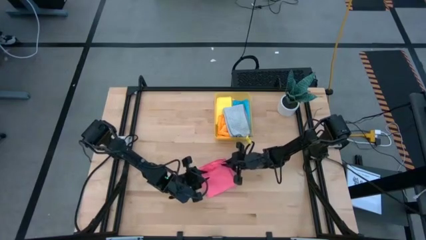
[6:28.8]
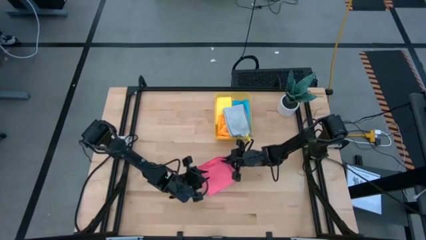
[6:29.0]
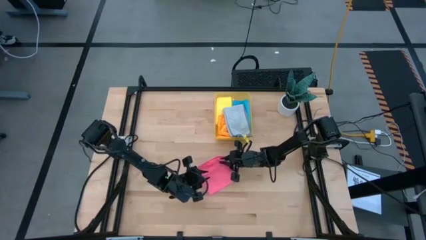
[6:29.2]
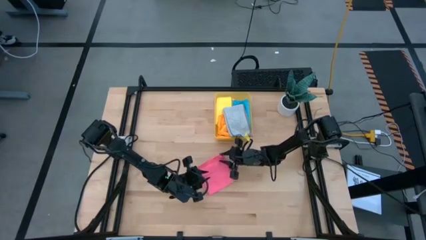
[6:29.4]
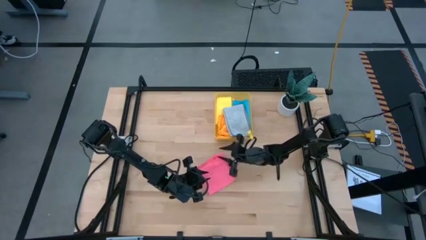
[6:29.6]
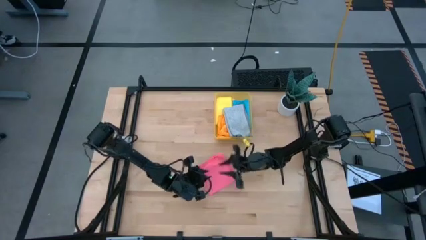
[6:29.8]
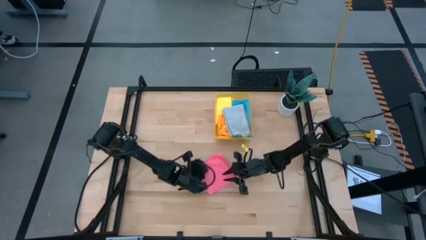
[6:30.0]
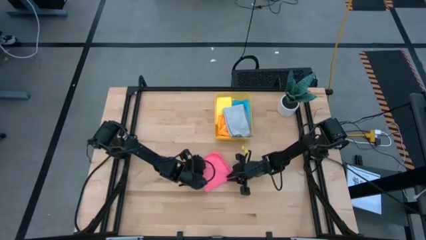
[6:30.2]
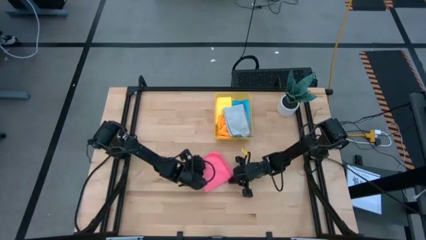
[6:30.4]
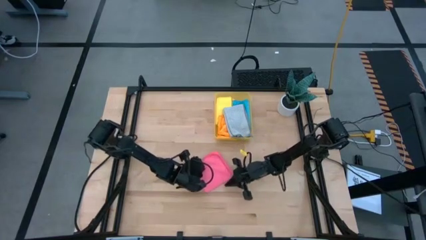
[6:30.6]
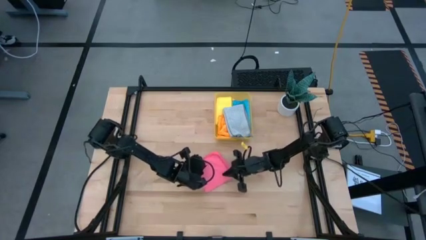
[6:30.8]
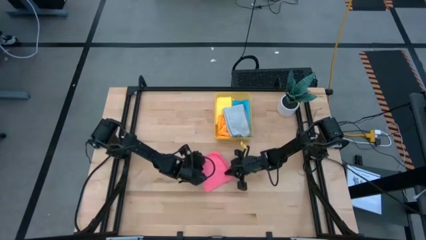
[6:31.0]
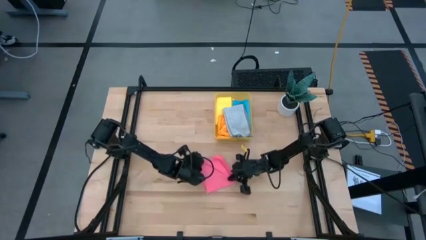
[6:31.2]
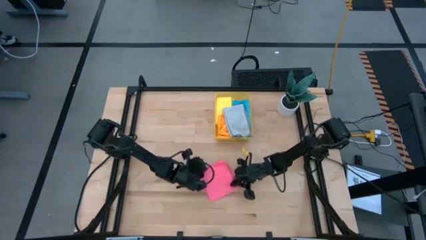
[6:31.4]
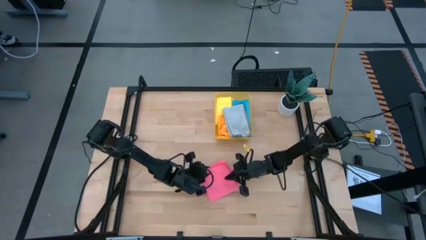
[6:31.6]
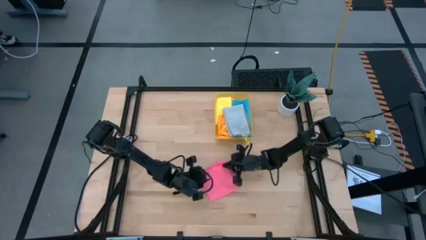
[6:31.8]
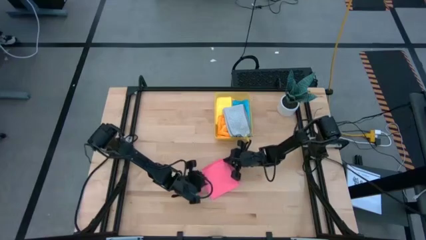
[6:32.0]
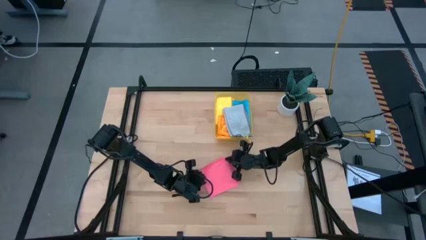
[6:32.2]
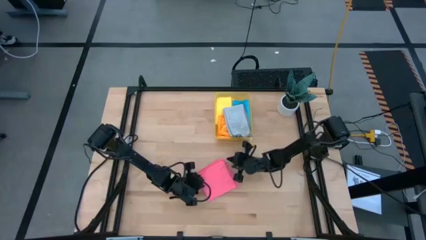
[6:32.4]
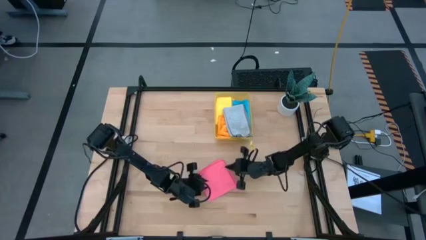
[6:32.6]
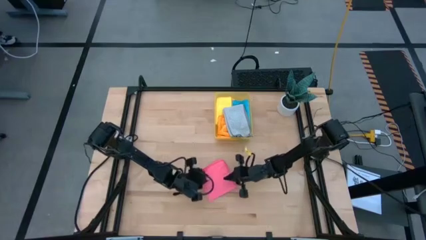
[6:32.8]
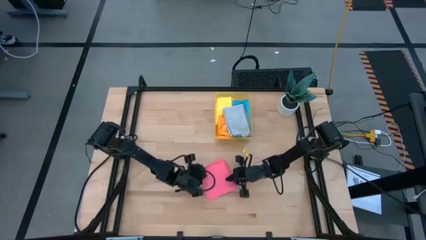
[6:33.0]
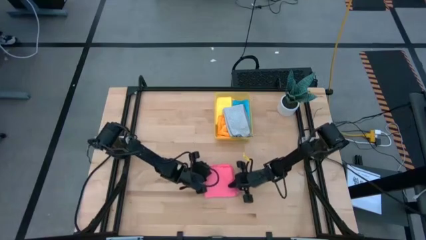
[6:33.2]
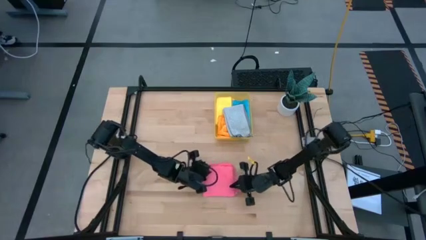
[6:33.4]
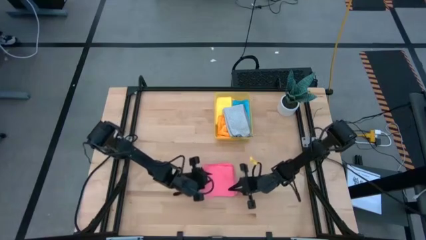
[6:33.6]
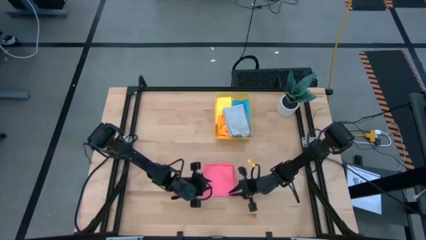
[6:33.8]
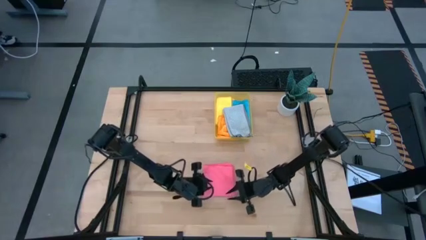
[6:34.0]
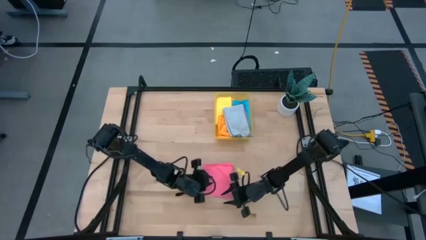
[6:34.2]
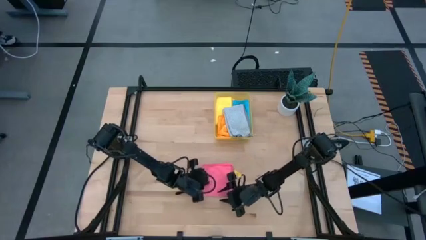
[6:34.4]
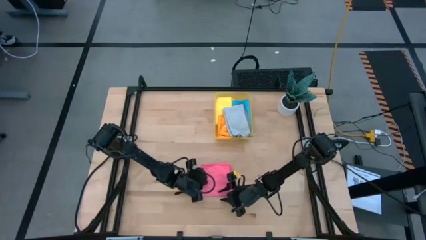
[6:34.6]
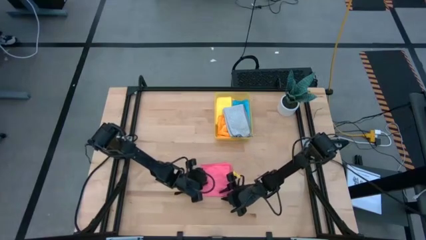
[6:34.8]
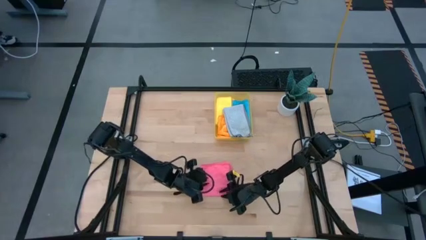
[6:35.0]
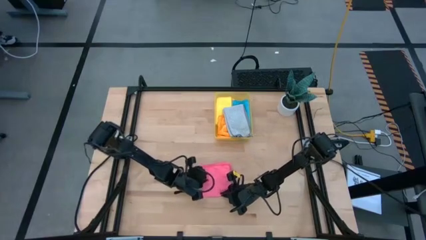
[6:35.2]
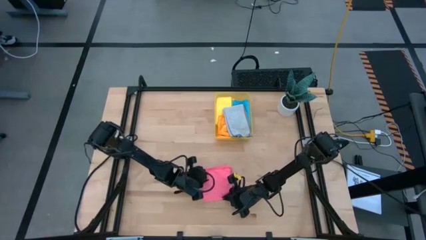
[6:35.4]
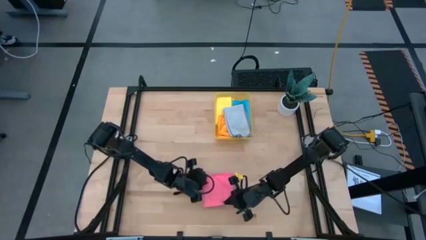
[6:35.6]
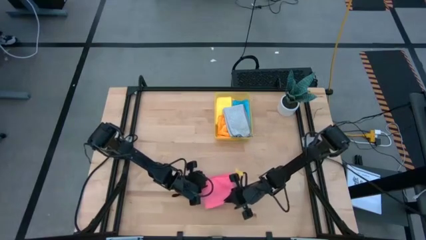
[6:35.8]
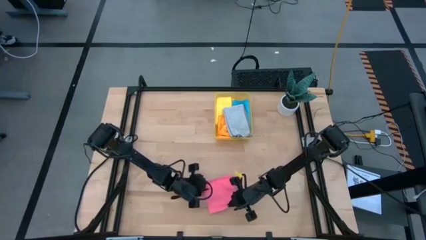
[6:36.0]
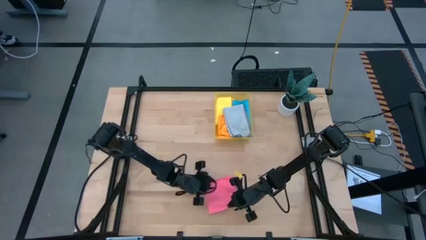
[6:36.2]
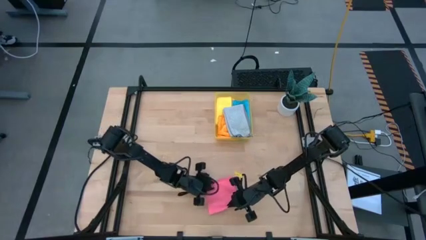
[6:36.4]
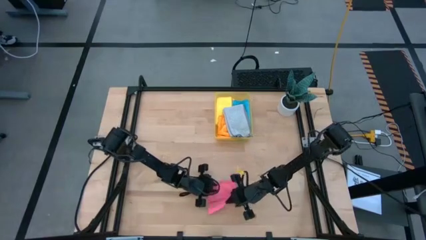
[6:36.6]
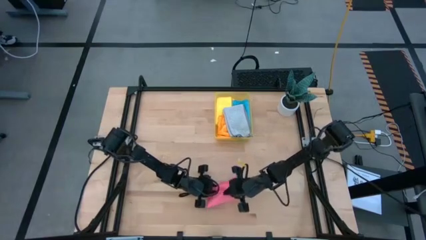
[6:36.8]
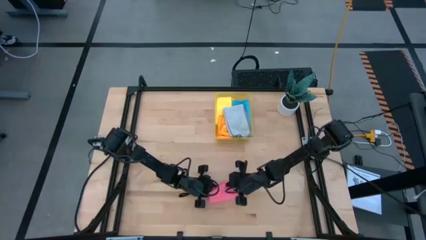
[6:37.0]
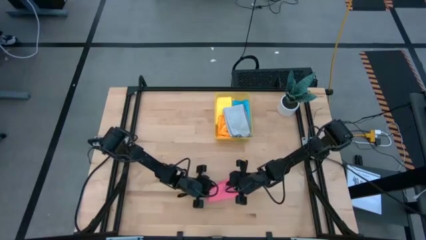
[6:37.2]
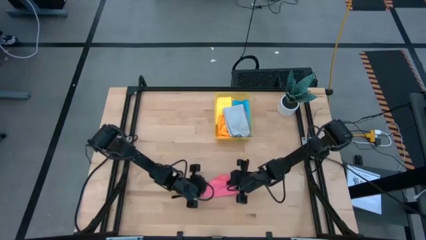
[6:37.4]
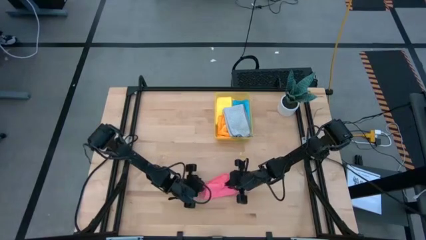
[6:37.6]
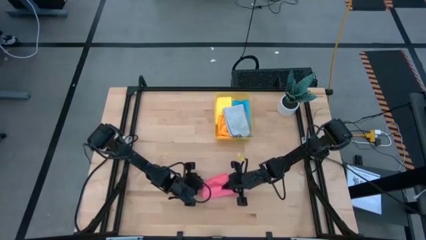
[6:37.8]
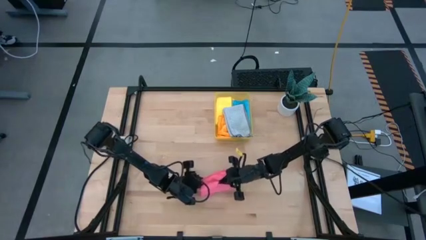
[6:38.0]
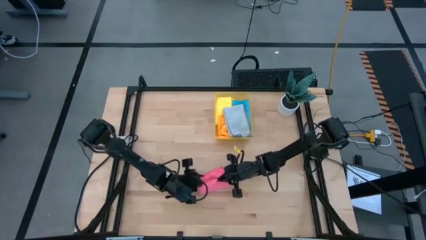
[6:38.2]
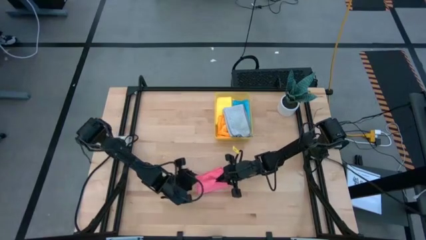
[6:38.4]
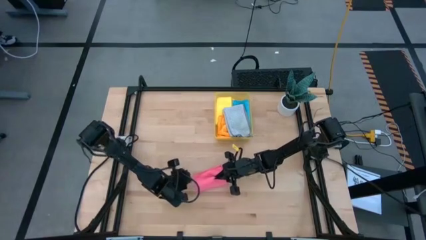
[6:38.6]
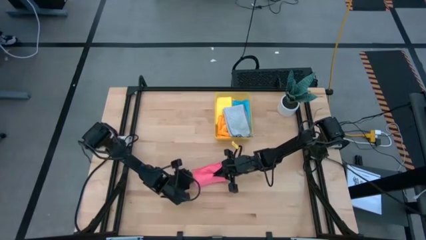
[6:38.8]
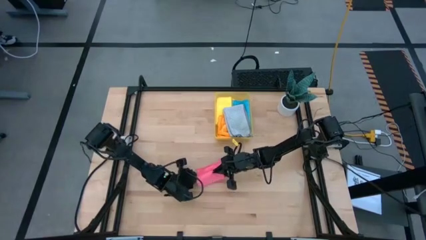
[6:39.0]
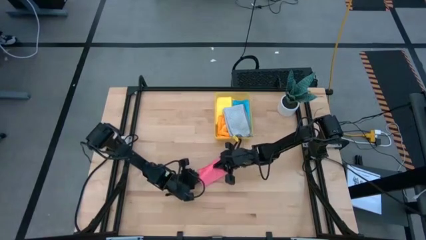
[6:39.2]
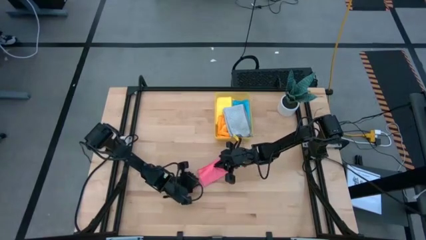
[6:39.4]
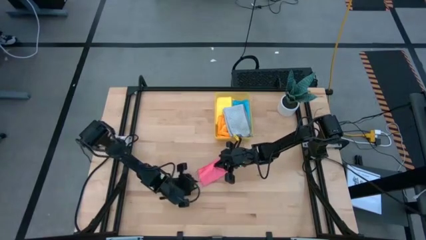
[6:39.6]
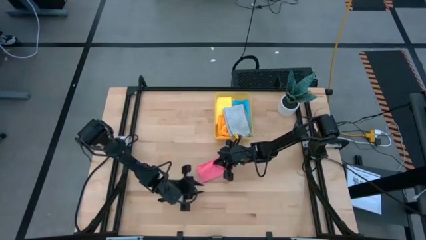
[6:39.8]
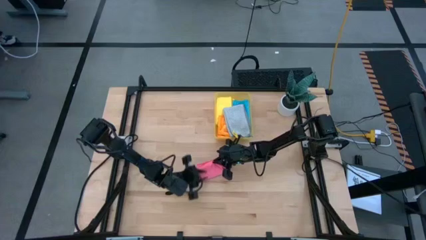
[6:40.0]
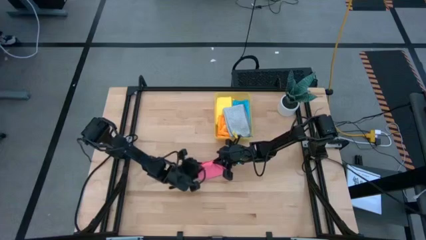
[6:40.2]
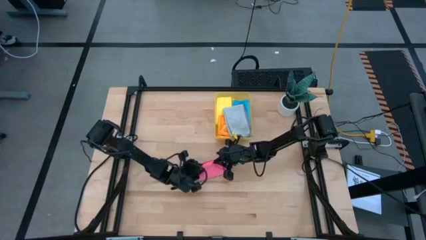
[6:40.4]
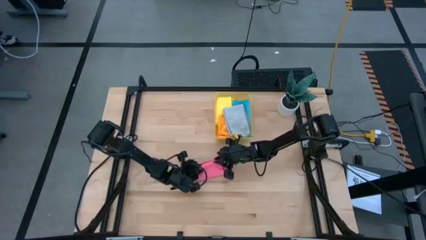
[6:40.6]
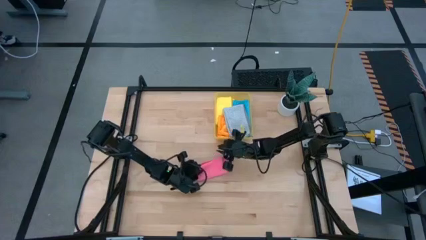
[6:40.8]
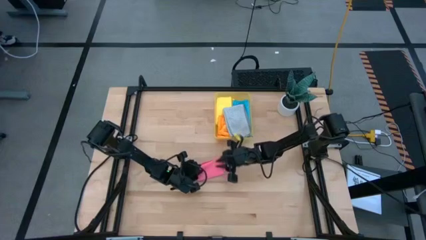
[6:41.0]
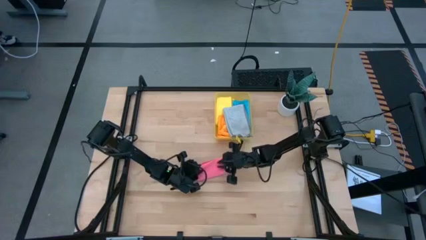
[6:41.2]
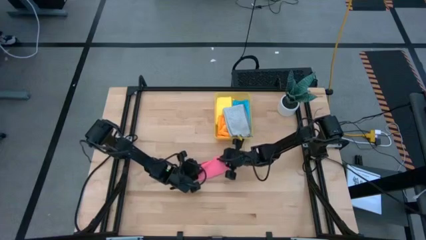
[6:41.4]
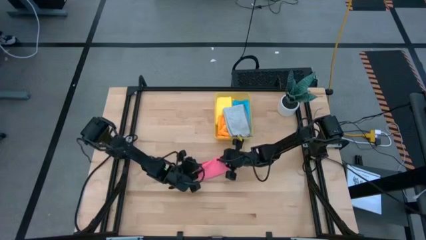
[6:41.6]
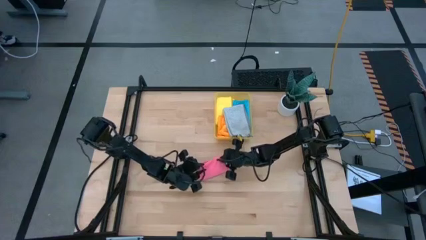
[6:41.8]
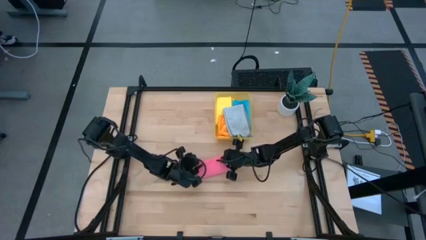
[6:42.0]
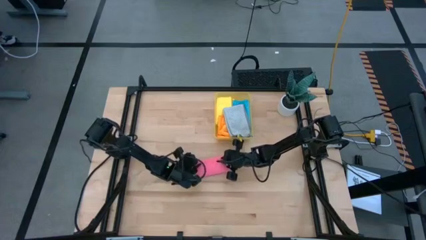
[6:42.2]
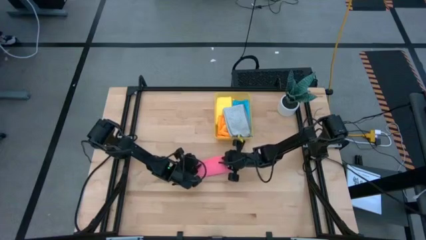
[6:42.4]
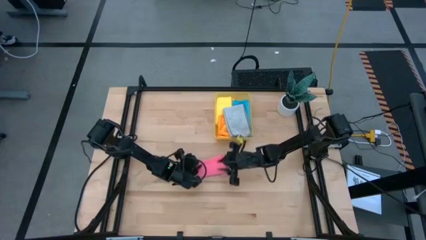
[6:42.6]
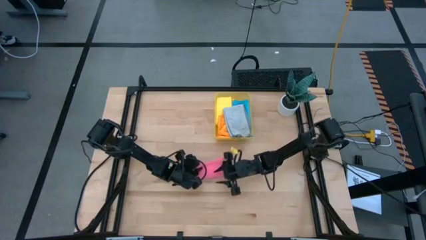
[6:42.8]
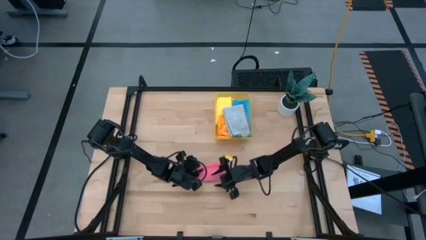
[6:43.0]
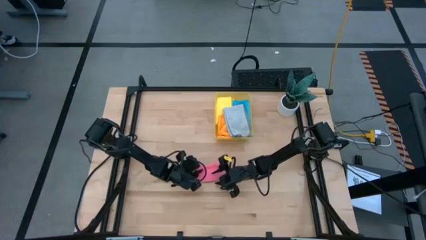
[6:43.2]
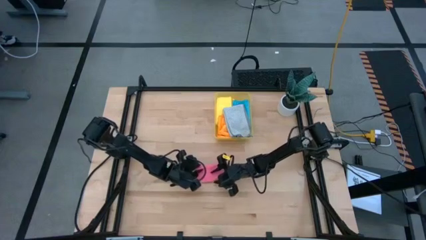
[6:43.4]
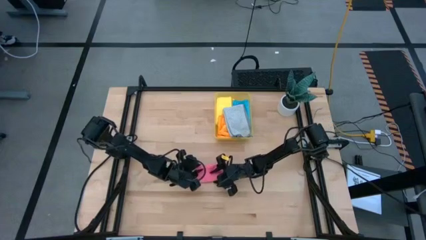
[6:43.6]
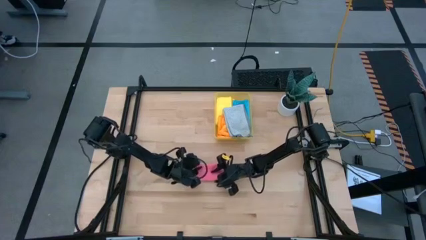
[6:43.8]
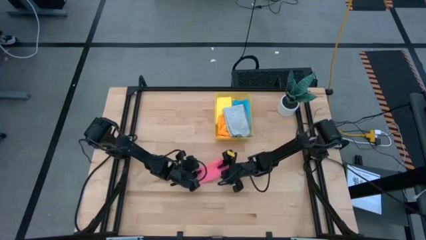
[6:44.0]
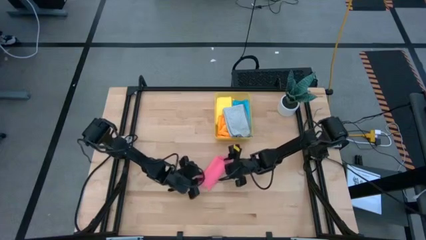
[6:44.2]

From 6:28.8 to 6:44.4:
Task: Fold microfiber towels
Fold the pink microfiber towel
